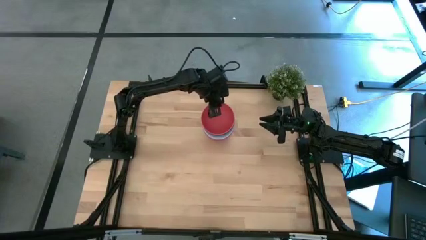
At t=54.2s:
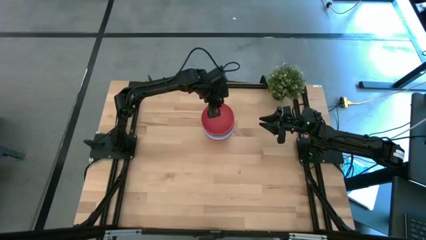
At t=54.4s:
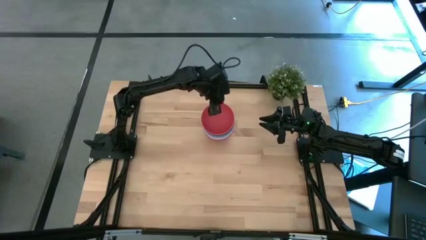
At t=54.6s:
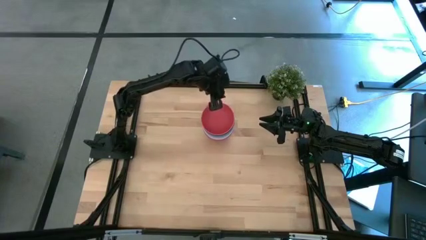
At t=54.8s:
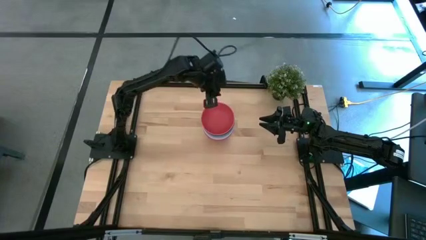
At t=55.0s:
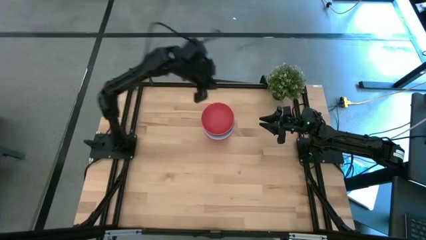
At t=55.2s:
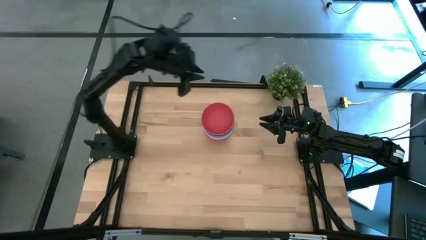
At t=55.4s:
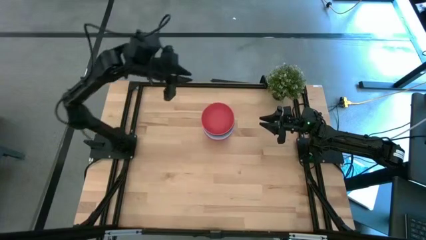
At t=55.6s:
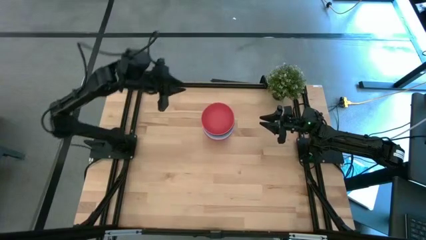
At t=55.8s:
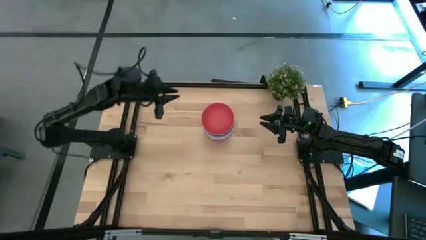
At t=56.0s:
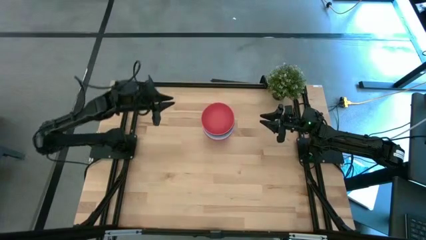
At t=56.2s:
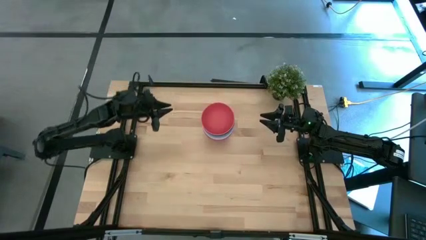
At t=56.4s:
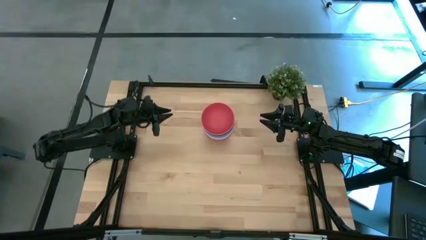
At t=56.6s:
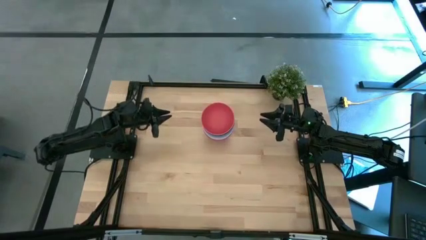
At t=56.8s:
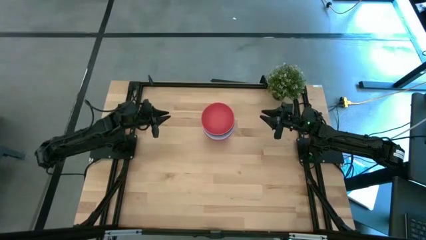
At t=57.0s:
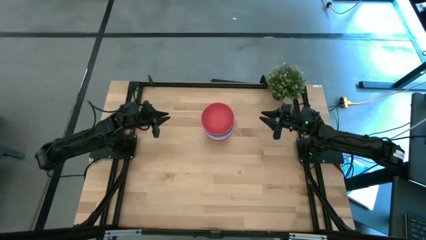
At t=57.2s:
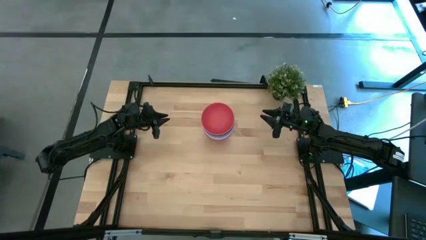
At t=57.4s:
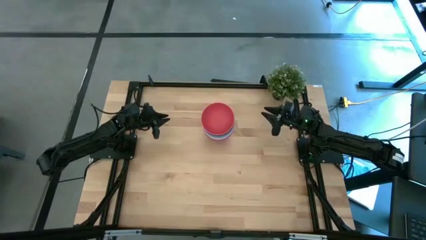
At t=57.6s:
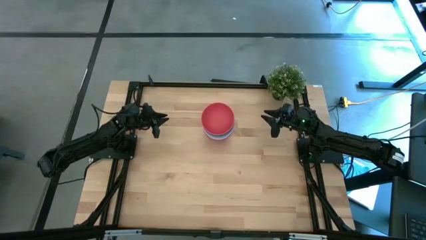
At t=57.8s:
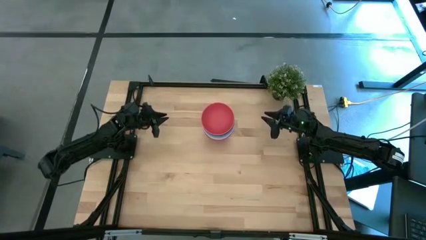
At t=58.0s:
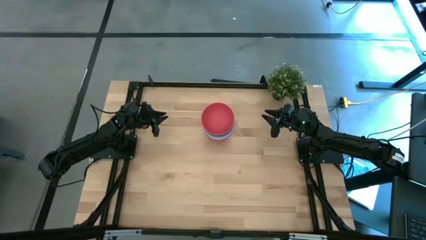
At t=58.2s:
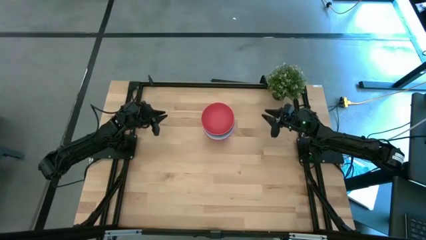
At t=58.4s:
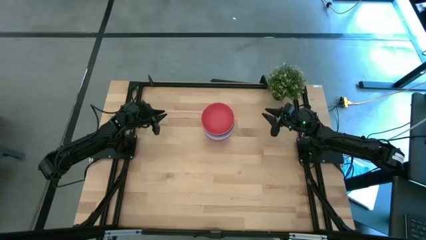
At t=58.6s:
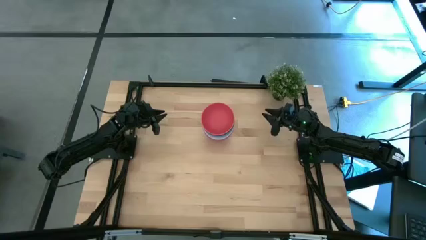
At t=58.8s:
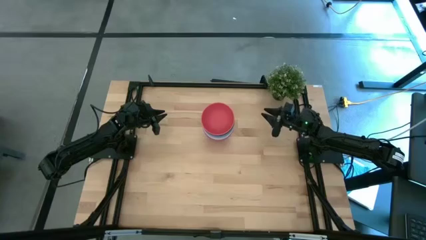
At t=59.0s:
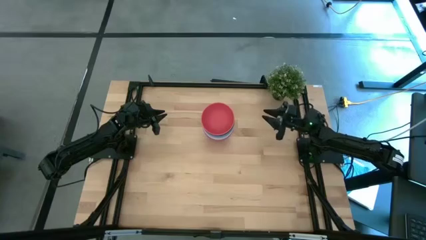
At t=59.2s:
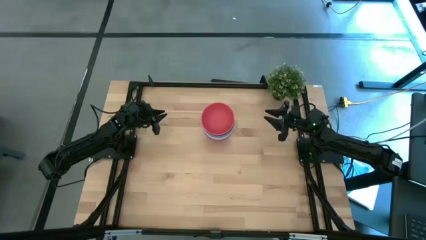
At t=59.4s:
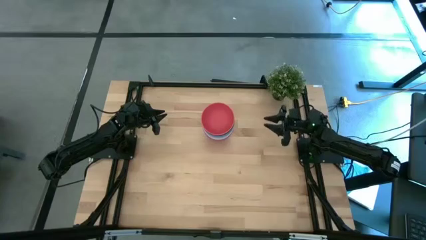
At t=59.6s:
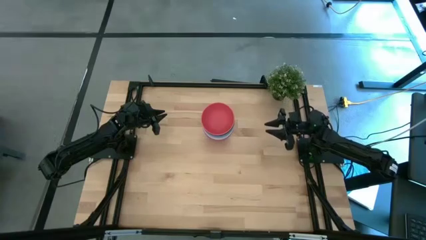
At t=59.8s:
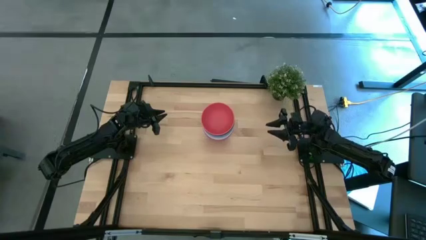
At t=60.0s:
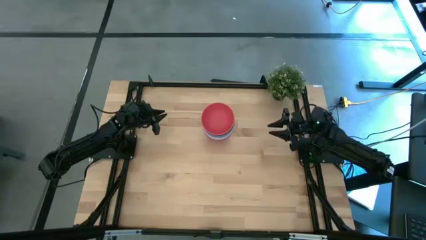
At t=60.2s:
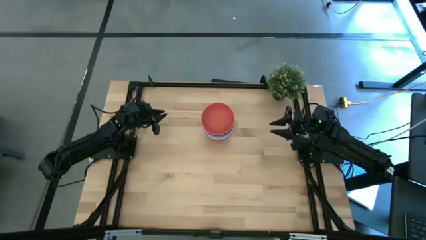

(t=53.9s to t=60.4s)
Task: Nest bowls inside each other
Return to Home Position

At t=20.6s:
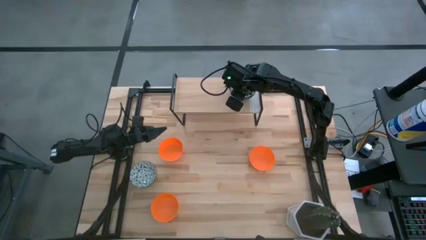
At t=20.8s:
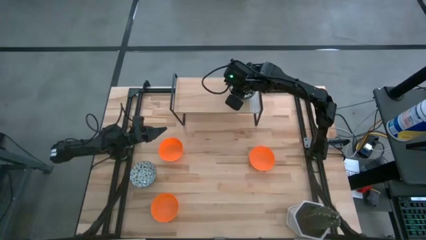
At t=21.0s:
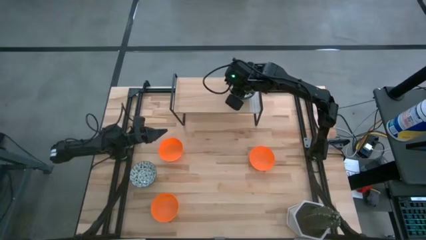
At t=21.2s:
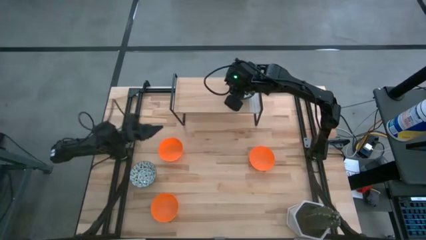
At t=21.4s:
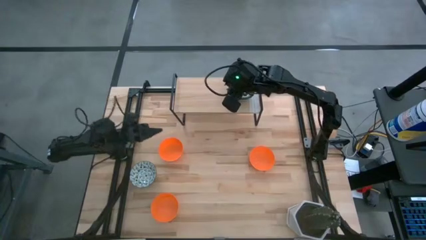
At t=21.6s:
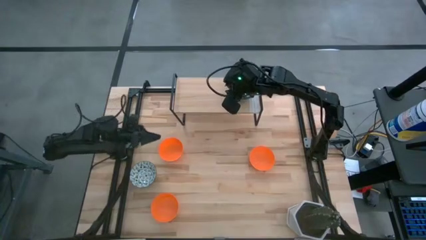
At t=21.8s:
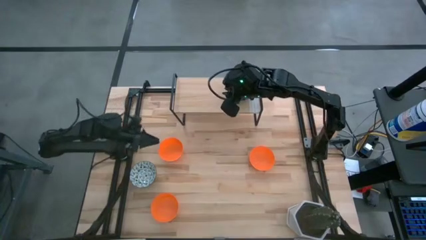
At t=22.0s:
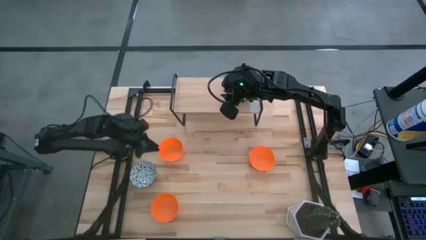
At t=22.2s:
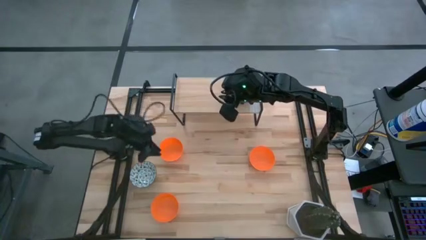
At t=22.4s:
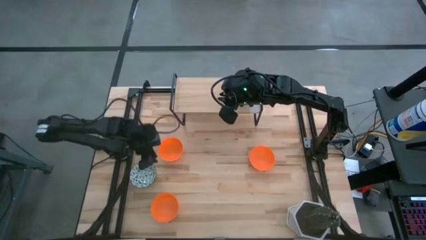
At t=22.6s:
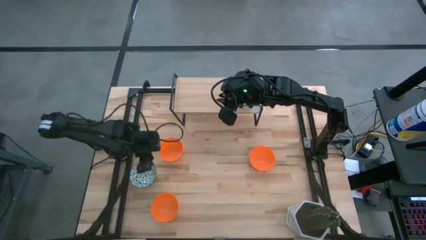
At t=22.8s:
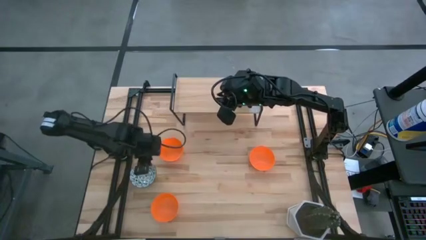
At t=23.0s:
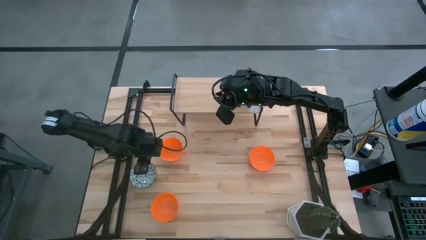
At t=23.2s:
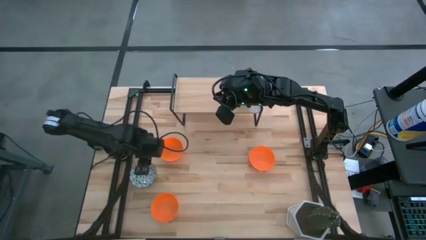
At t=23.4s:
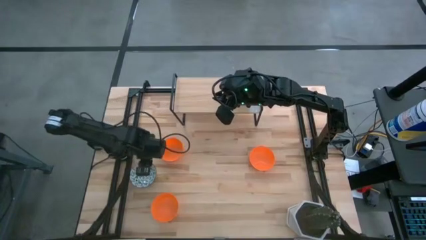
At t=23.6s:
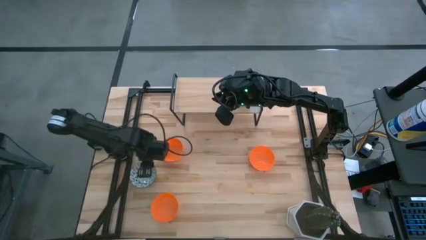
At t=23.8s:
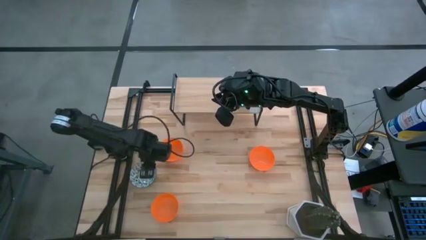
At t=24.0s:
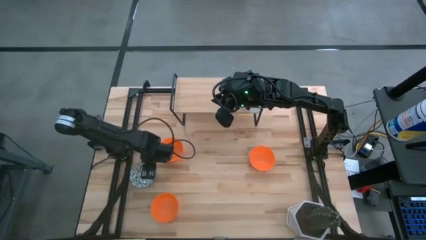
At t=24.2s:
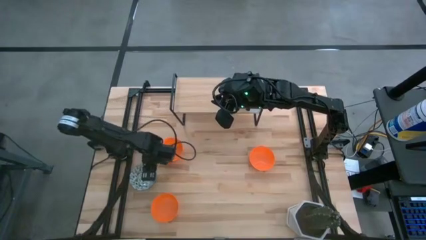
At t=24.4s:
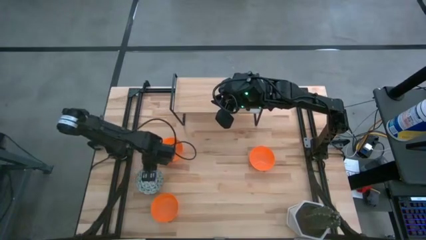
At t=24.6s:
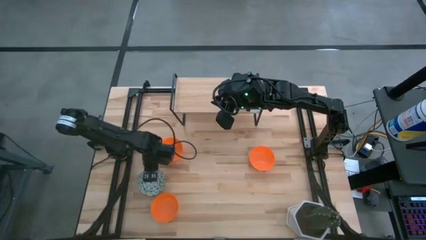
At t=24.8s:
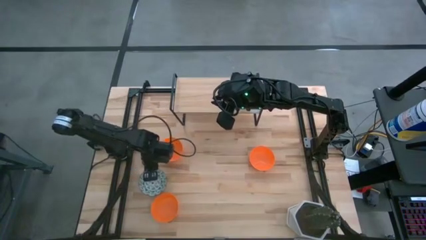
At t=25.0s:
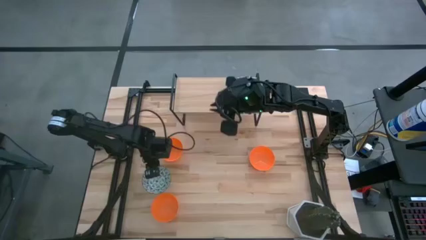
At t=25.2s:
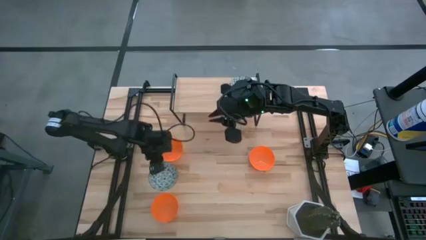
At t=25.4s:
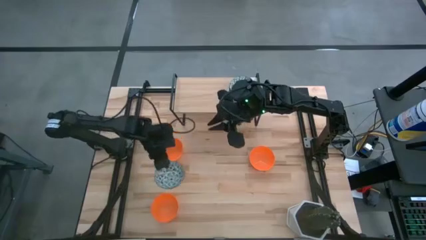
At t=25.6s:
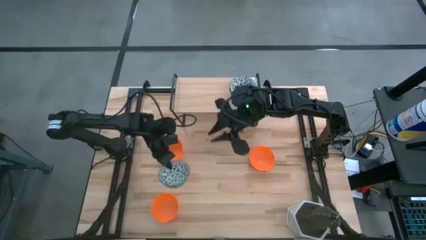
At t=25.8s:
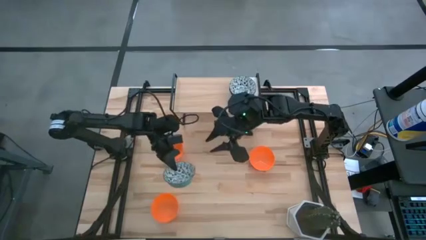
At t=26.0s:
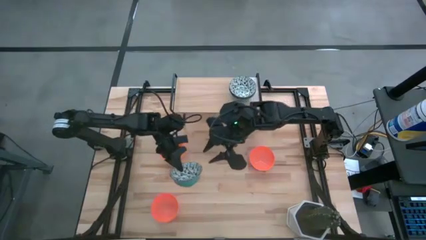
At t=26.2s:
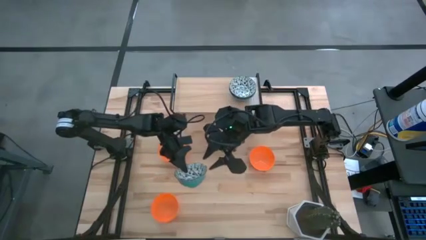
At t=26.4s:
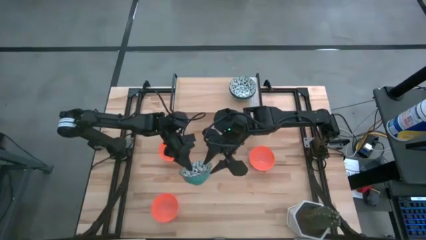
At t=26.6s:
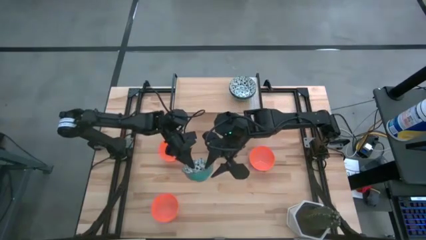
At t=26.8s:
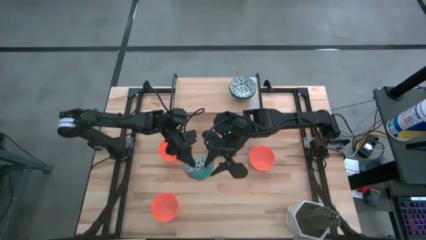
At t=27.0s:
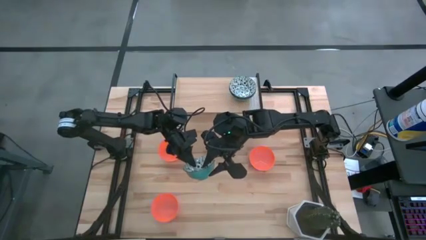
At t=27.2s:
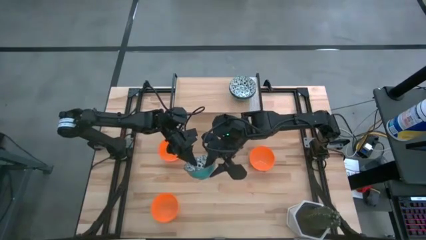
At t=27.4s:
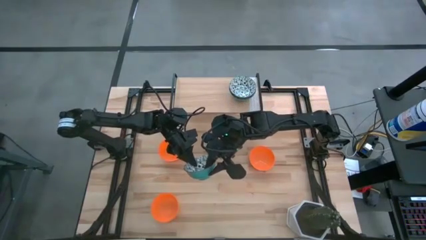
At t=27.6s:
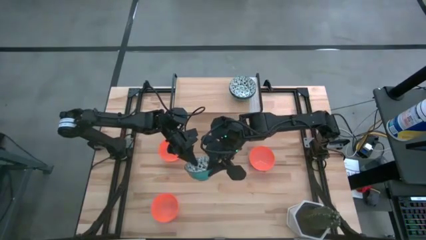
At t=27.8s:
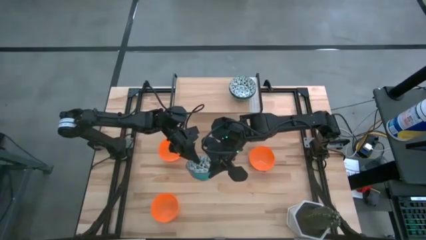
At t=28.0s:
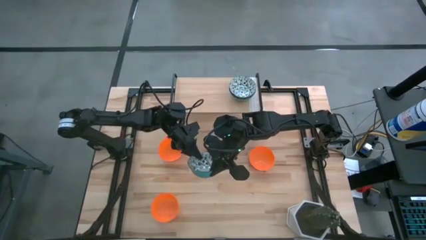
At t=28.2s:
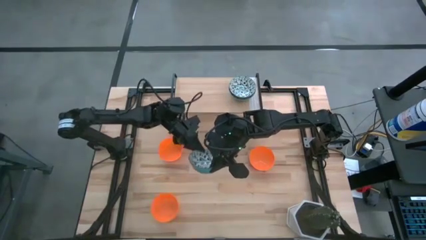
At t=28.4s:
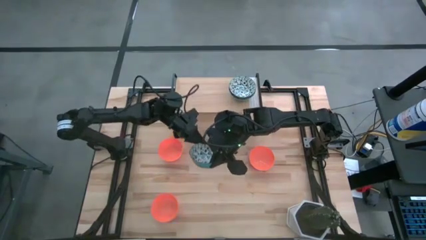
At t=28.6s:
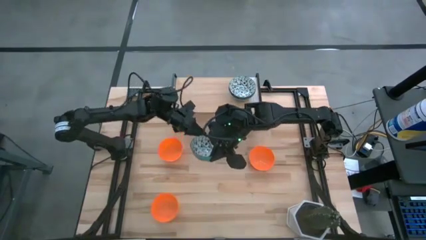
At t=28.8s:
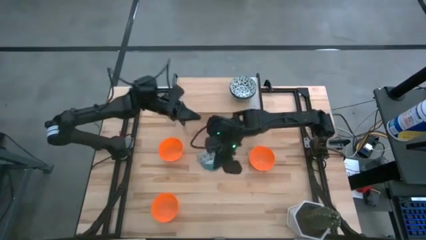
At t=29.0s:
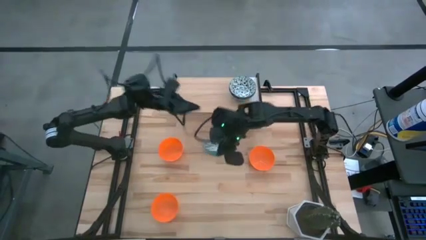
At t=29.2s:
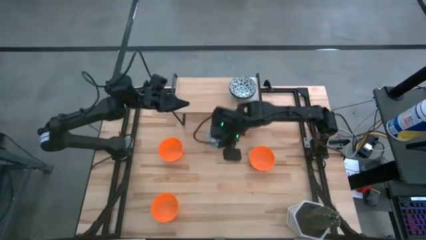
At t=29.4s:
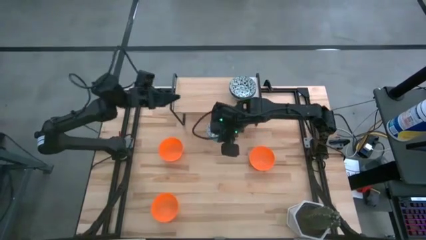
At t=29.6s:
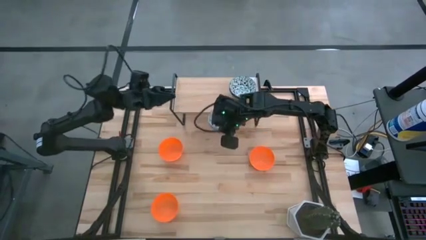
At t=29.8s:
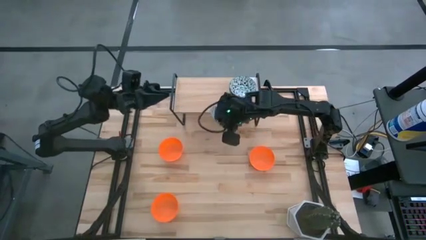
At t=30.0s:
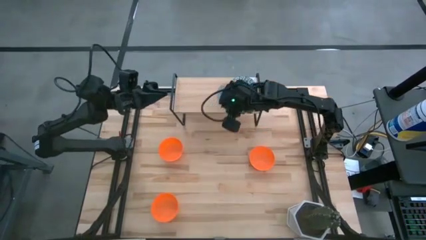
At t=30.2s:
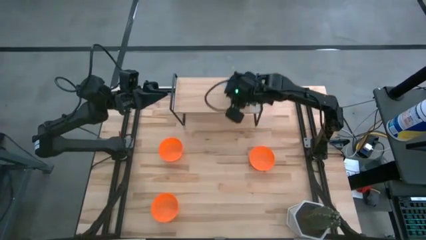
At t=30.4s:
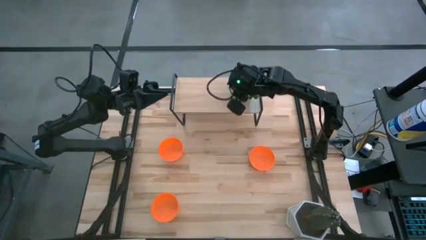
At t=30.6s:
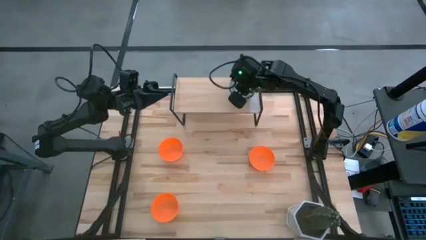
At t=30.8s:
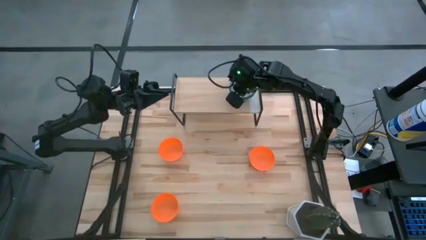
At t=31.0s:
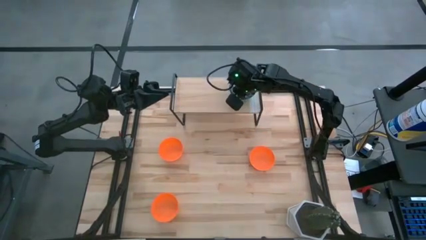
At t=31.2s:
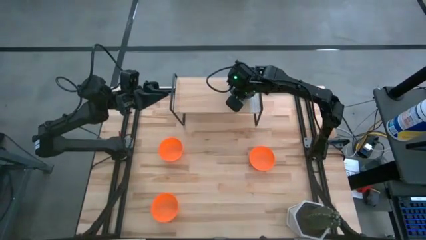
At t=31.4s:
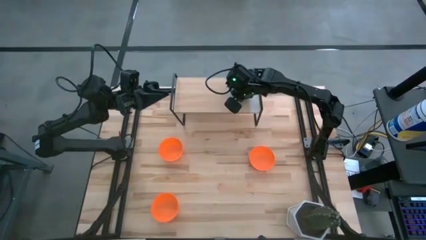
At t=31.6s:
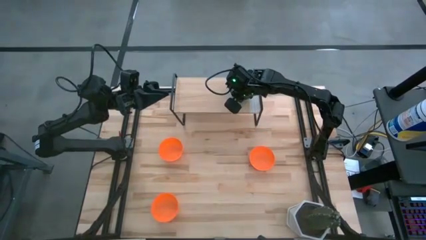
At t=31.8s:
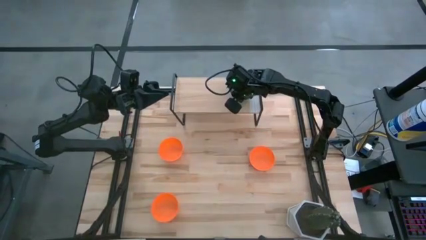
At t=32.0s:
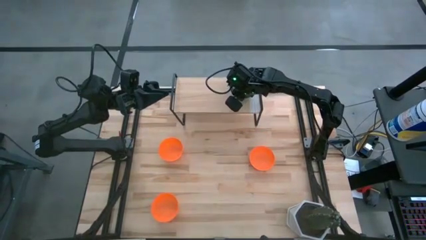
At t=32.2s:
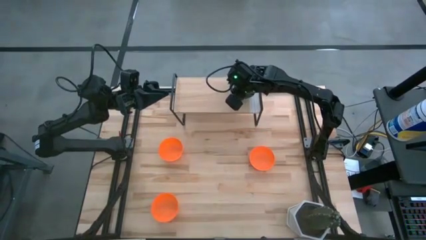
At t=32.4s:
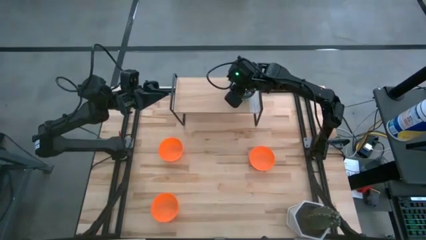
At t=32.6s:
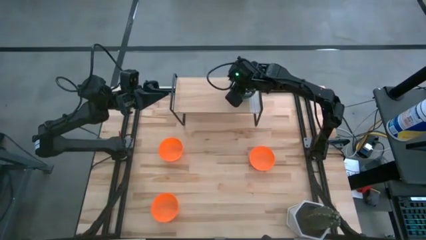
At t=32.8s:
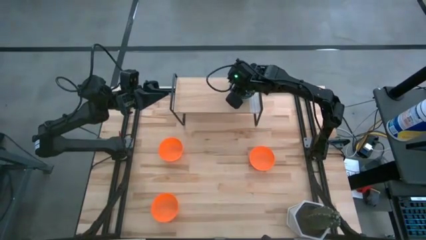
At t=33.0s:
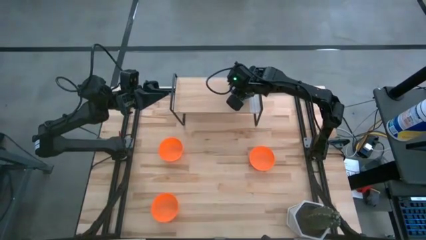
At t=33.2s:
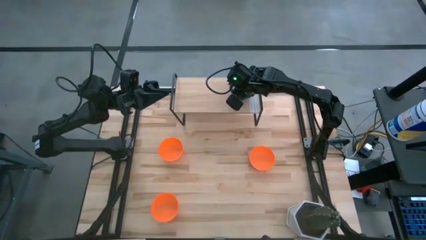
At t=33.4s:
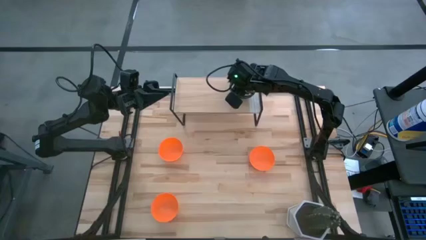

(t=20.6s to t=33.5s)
Task: Pick & Place Mini bowls
Stack the white patterned bowl on top of the white bowls on the shelf
